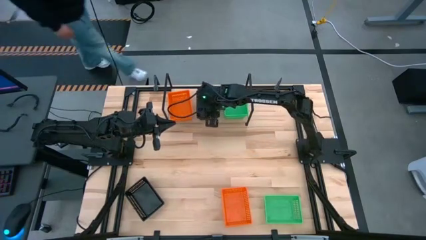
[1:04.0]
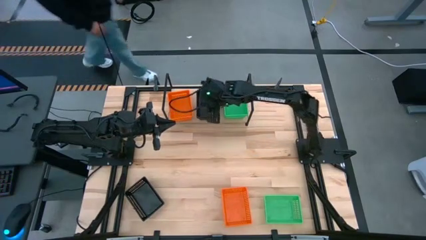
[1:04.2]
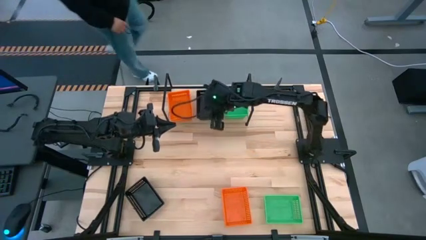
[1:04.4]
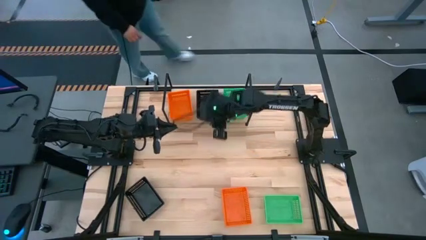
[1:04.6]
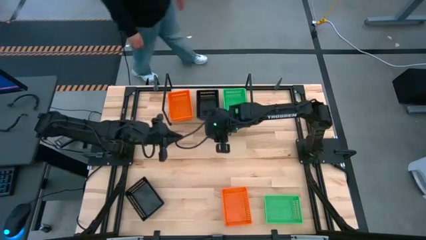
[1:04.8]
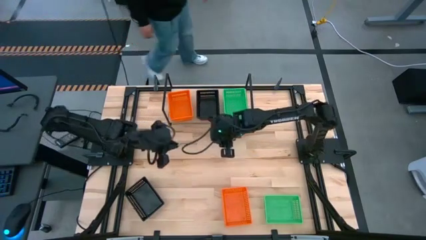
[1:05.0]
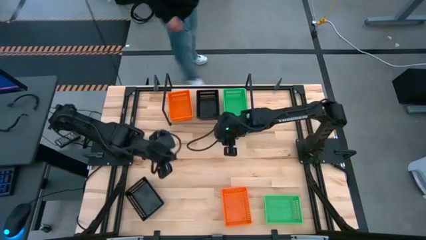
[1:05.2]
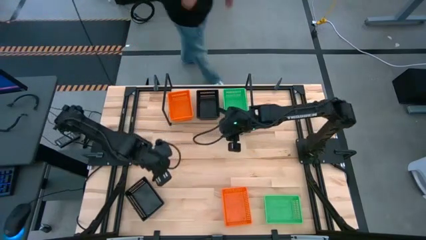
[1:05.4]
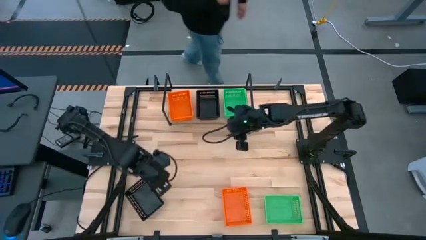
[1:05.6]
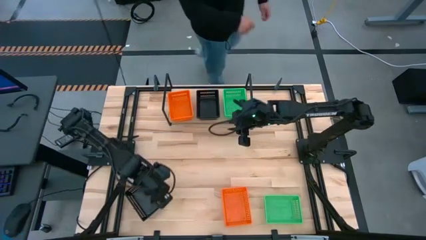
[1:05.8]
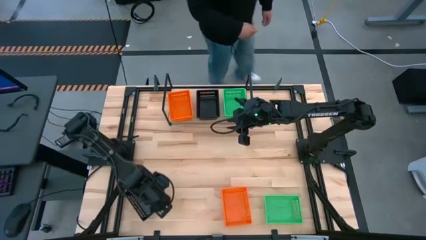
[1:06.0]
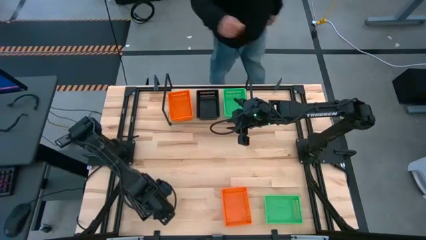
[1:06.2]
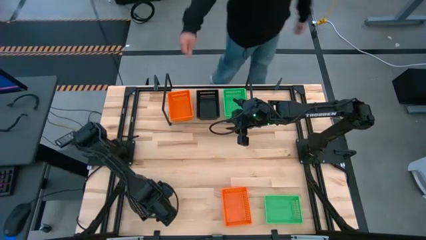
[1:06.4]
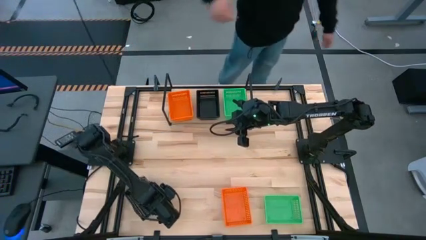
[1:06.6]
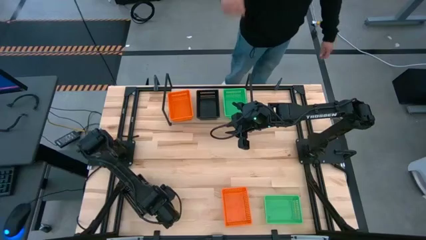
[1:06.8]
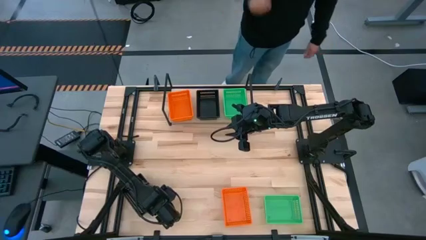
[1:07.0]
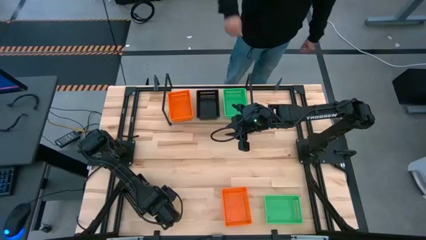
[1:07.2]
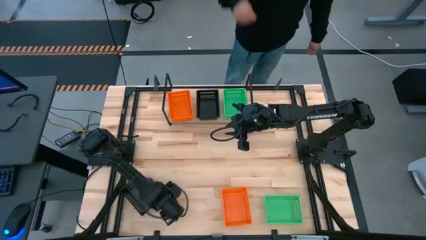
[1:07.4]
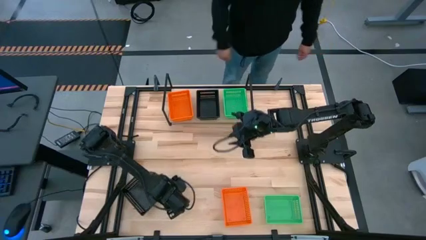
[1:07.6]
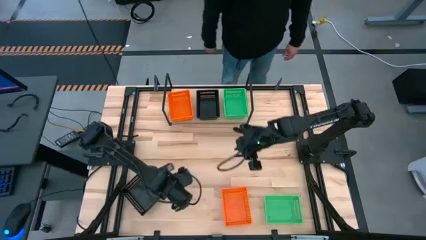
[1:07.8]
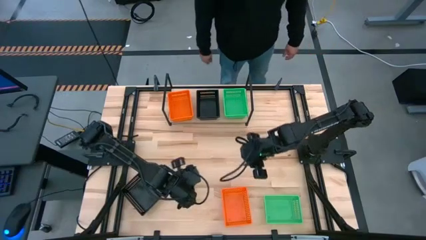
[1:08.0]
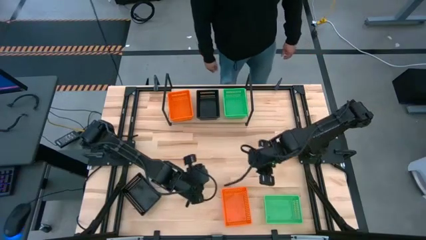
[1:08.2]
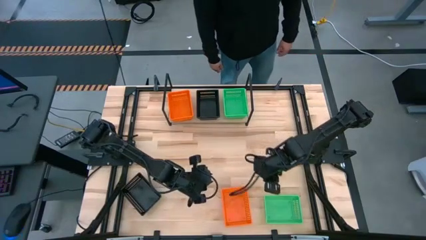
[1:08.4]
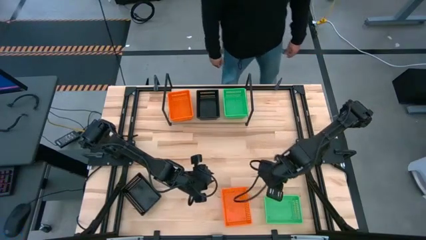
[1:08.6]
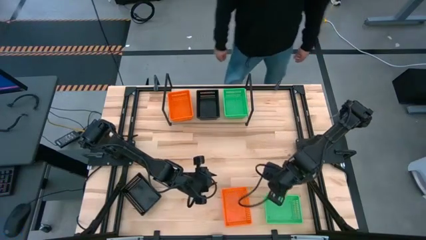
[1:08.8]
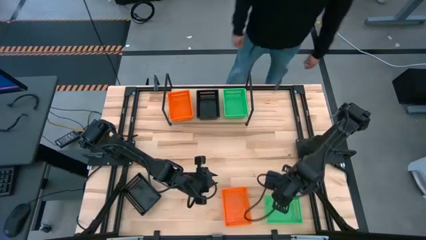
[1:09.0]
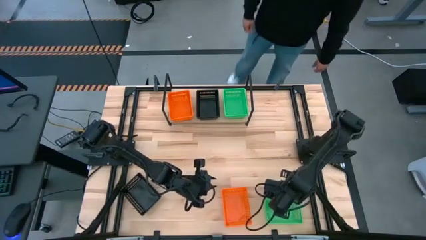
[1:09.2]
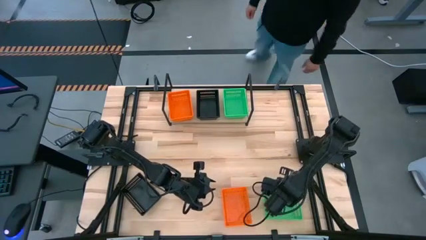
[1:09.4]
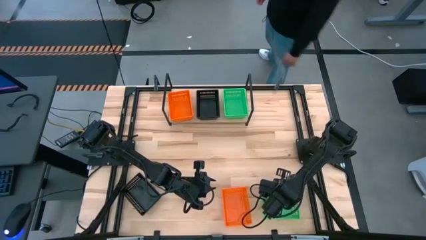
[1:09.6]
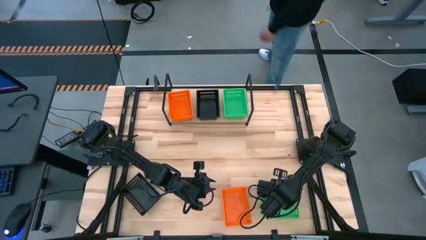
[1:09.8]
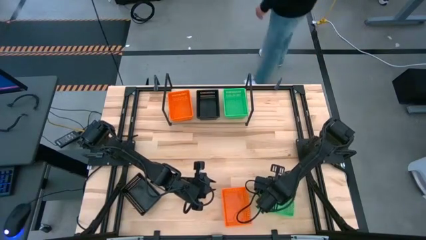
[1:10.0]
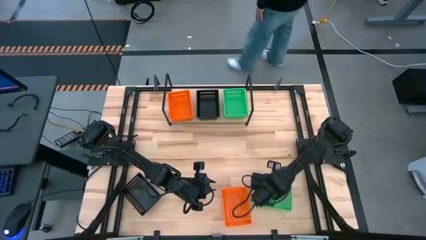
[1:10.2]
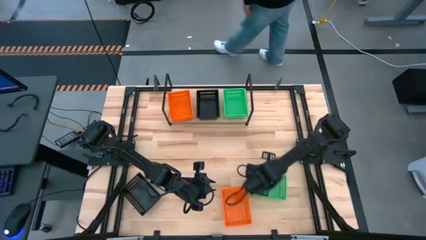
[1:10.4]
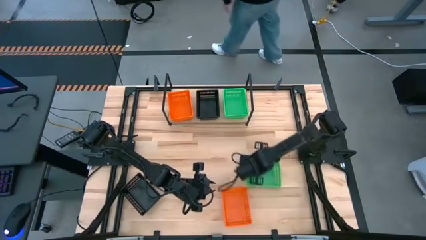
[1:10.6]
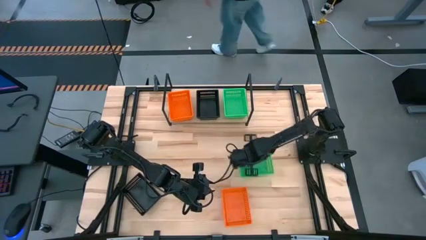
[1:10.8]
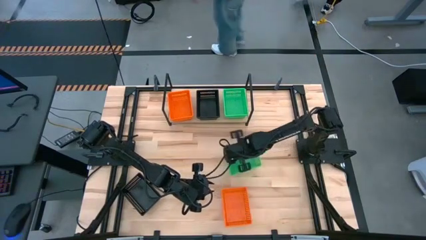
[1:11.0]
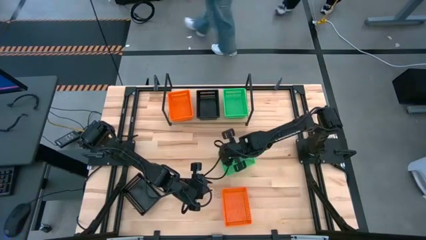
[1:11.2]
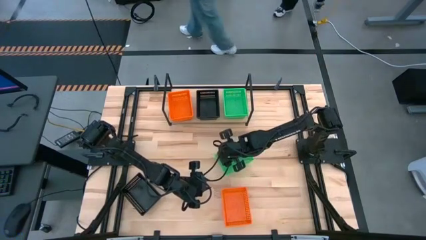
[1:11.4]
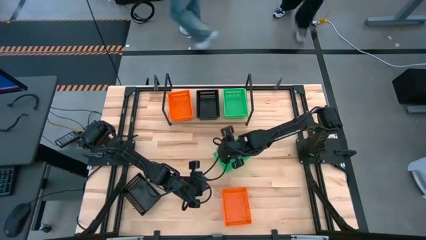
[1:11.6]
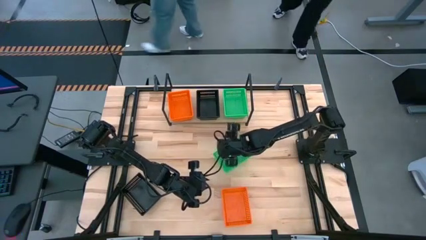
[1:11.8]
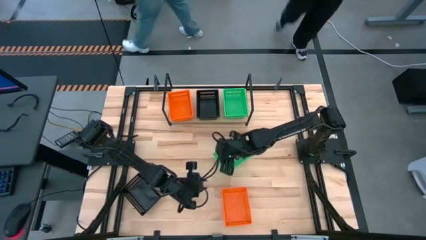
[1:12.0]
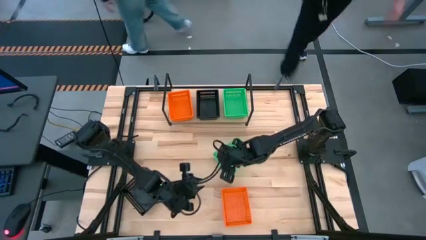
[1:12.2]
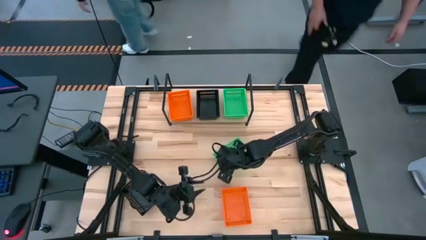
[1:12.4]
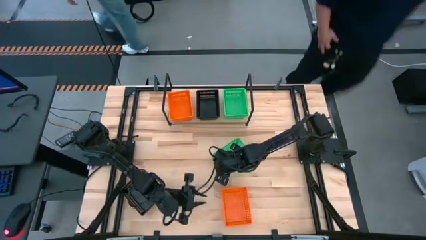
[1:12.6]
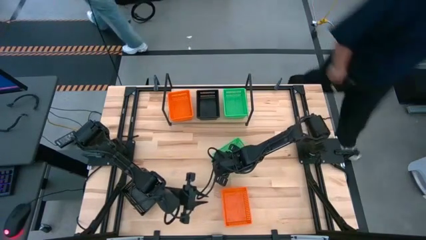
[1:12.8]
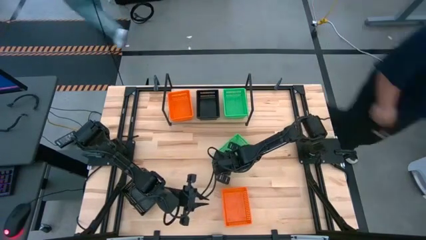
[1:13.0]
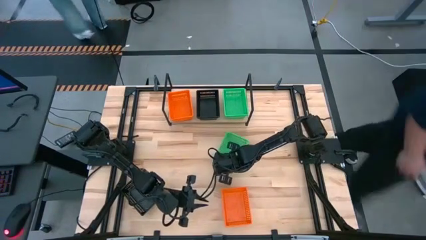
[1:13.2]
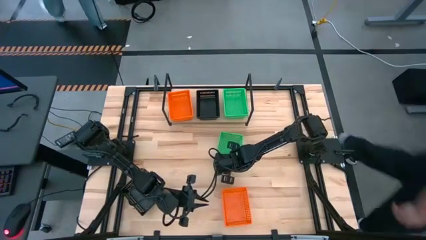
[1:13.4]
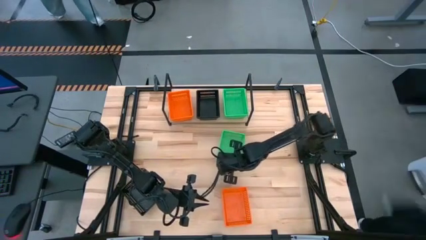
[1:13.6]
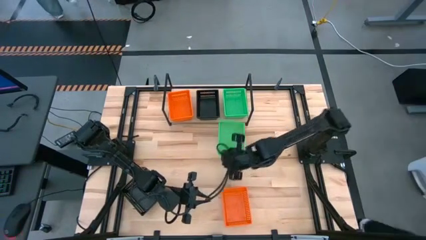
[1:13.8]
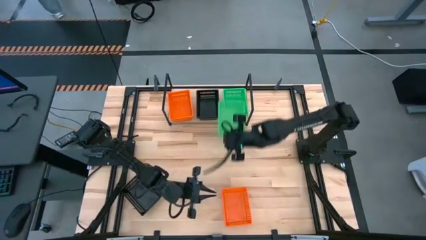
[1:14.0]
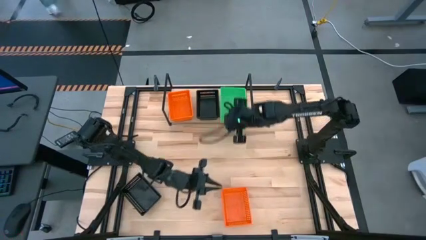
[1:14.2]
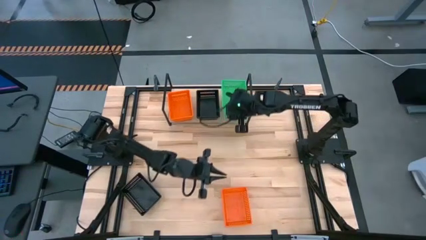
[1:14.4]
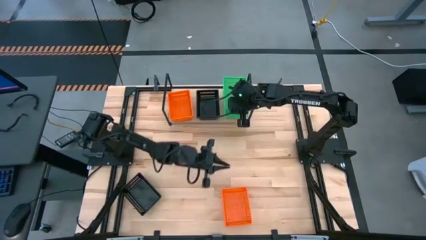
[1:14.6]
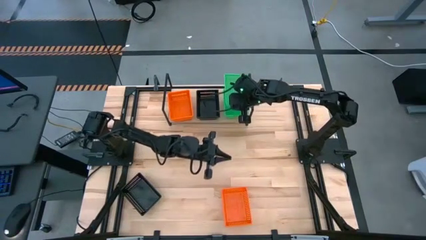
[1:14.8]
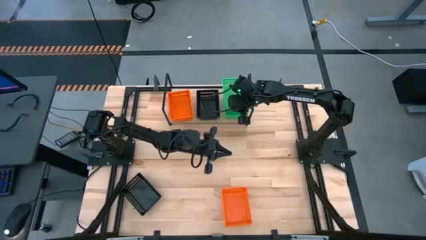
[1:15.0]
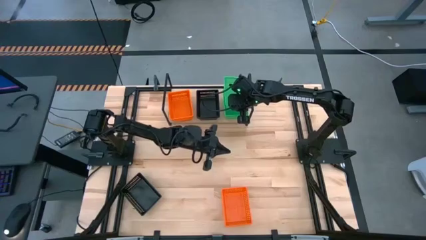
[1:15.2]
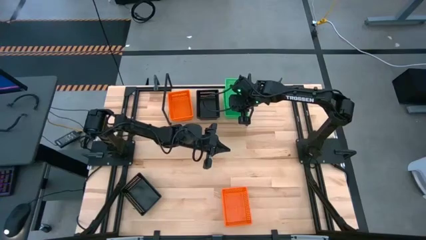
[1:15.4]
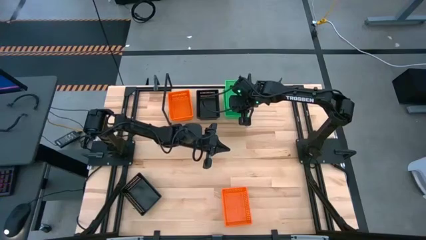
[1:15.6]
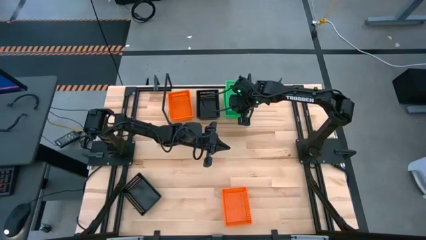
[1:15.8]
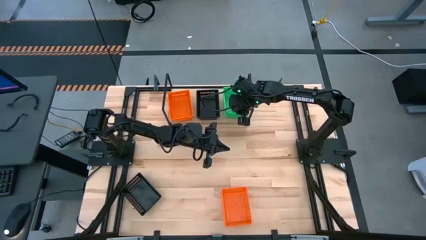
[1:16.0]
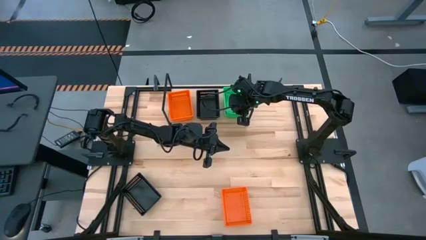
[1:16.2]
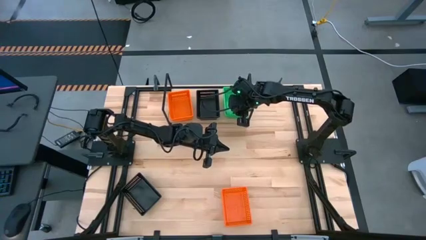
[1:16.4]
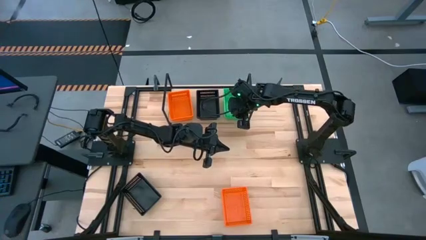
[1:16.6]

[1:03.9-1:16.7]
Task: Stack baskets on shelf by color
Stack the green bin on top of the green bin on the shelf
